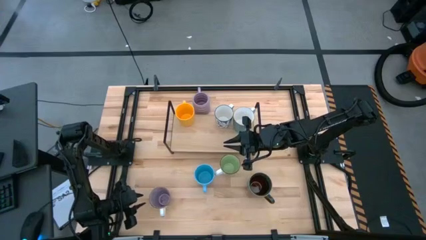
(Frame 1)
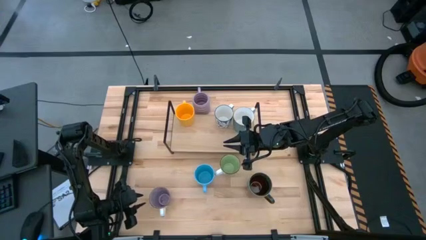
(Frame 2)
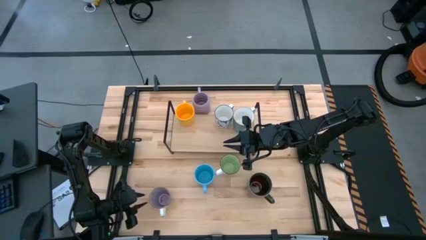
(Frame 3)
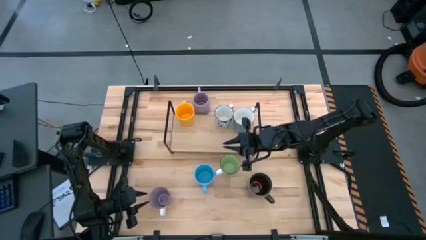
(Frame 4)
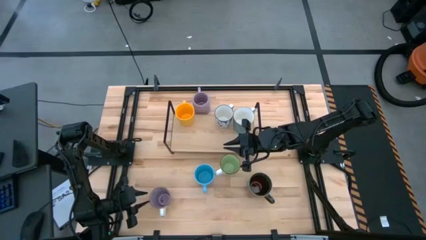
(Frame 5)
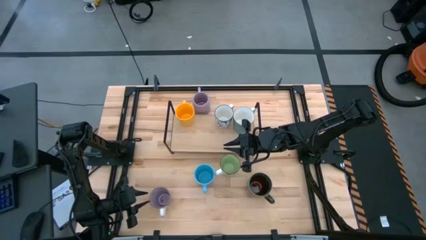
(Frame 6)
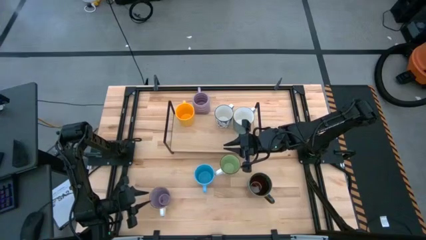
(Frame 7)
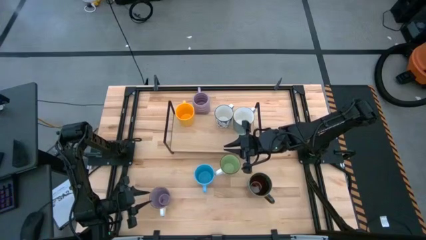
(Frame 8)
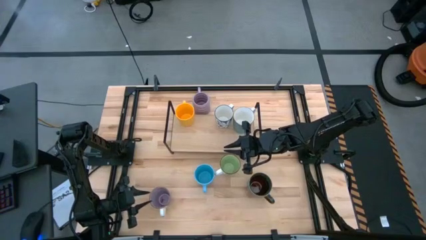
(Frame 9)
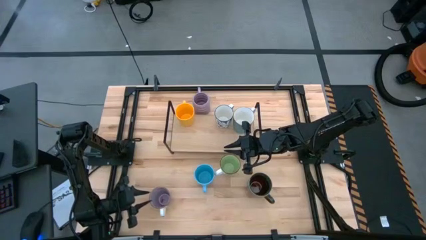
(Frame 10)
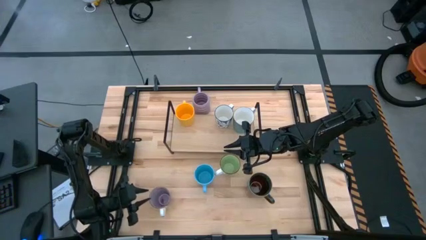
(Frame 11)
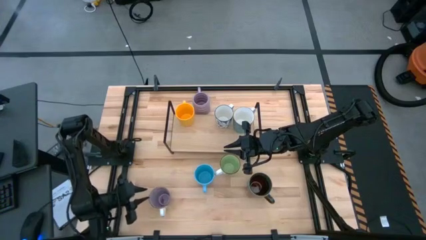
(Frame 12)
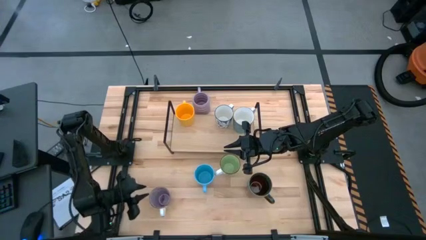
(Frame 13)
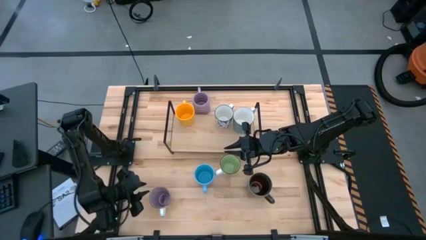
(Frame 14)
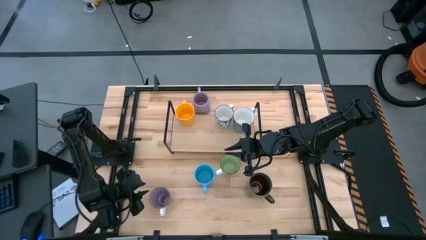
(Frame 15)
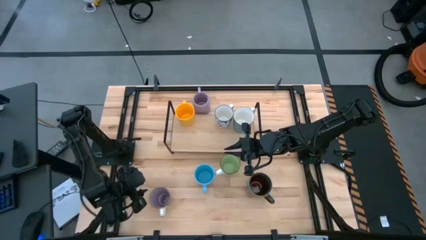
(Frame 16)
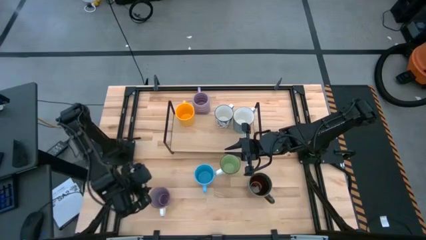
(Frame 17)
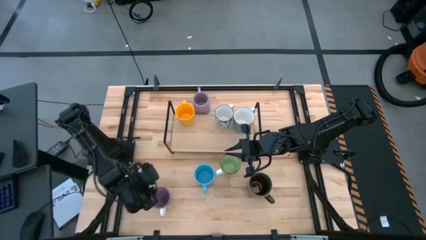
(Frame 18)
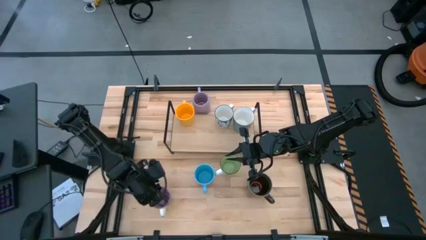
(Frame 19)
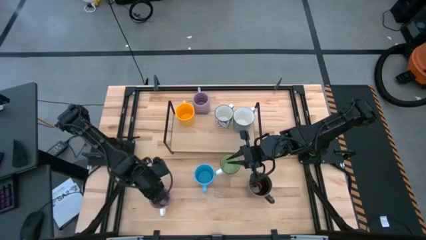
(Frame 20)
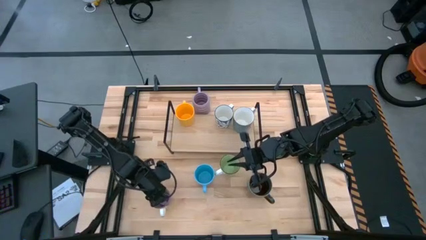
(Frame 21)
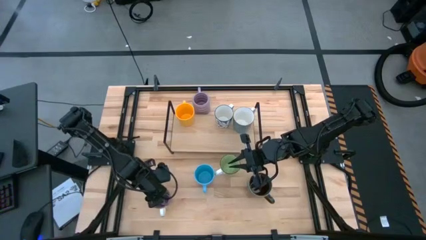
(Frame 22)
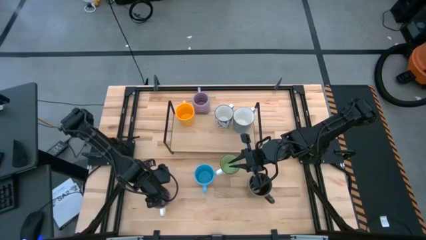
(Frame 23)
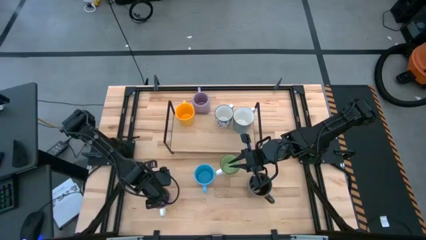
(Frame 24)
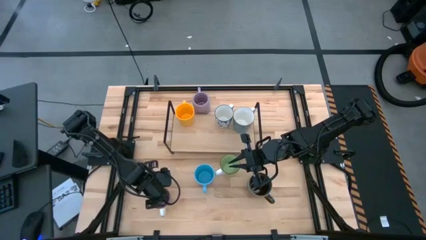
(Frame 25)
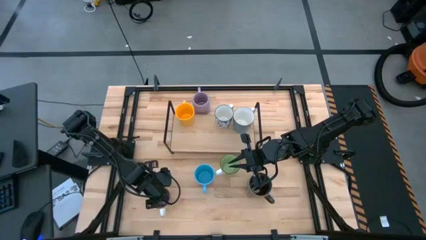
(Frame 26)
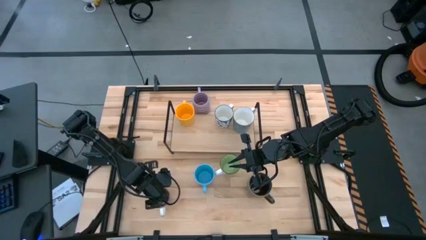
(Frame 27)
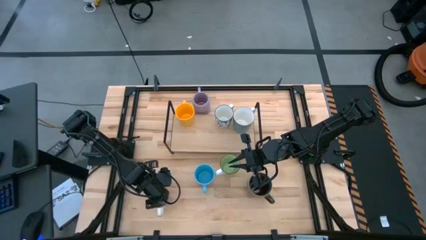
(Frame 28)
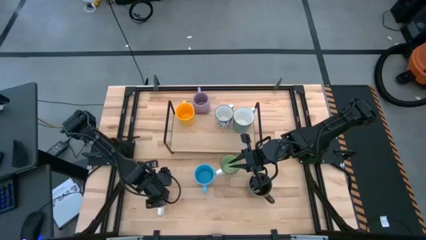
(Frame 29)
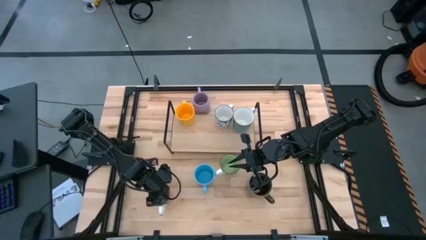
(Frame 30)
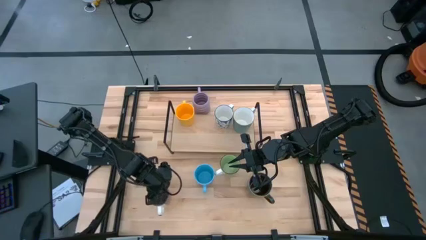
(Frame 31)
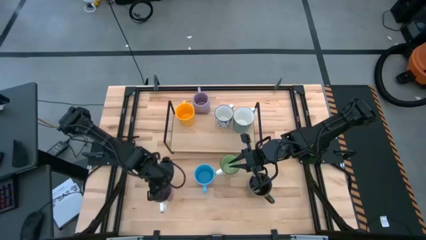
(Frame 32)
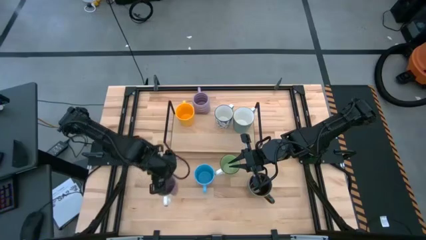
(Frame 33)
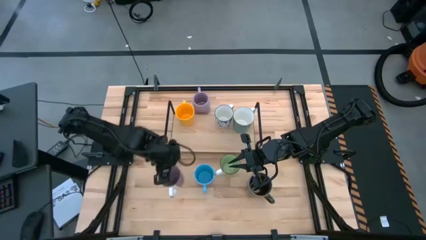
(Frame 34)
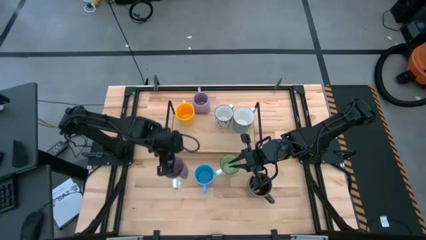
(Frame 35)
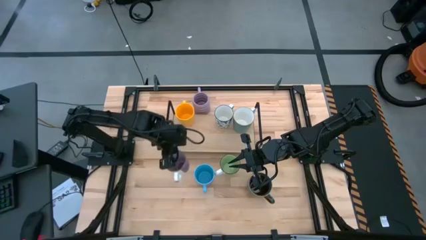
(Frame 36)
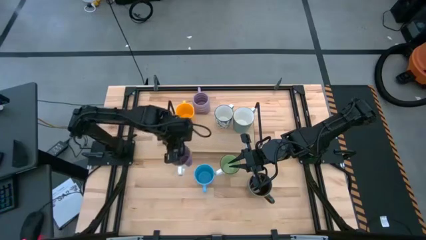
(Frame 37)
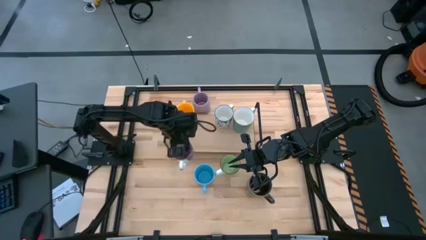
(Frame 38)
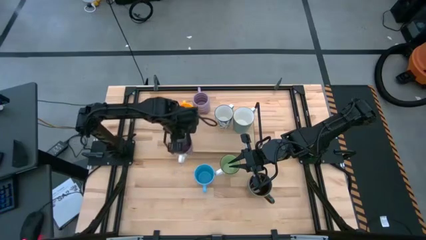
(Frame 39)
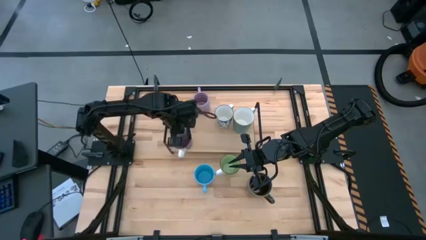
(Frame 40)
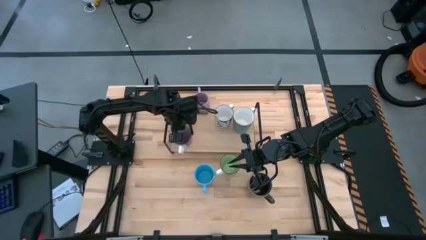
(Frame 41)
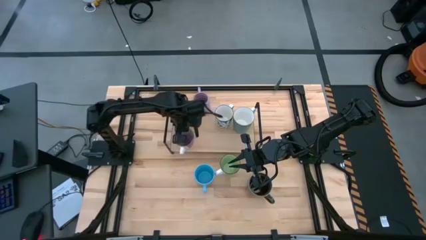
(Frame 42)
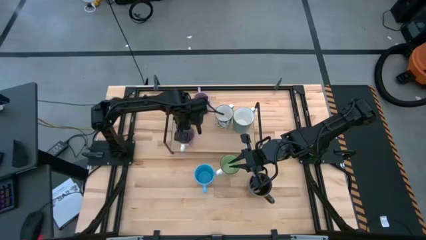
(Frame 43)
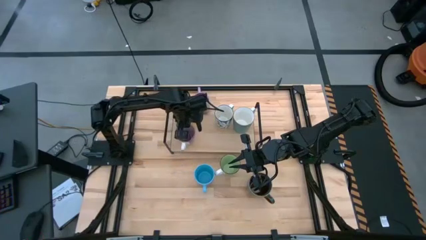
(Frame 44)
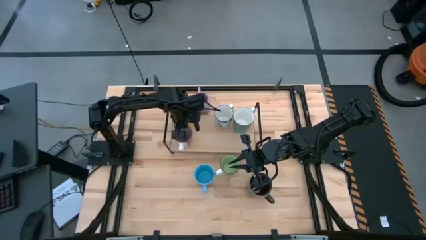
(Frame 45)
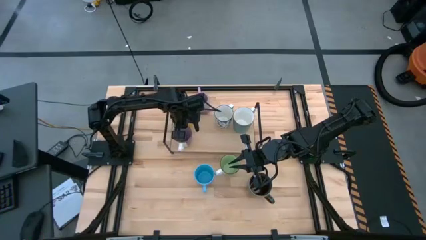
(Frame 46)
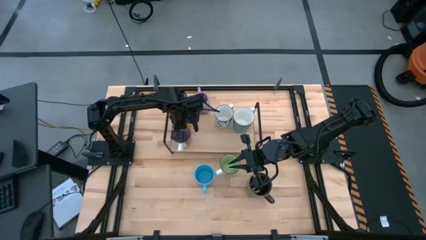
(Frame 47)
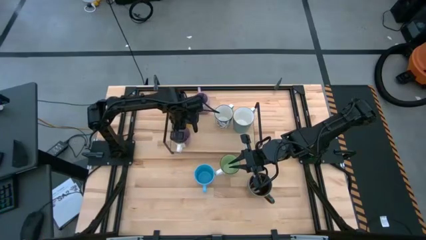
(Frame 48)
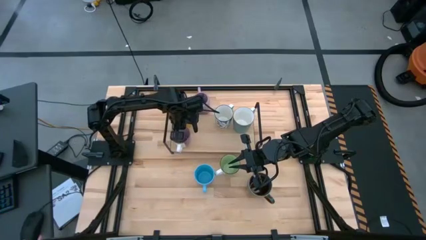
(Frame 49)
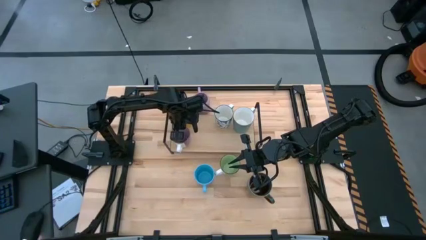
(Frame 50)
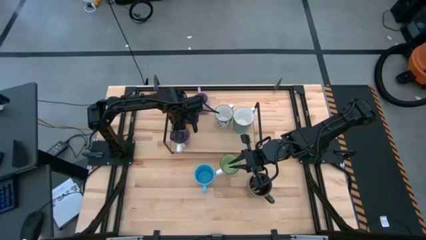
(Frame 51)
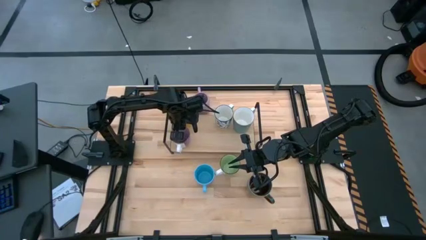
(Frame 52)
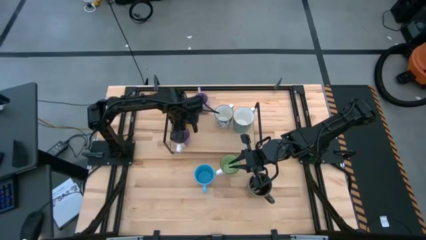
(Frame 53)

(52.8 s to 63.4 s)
Task: Place coffee mugs
Put the violet mug on the shelf
